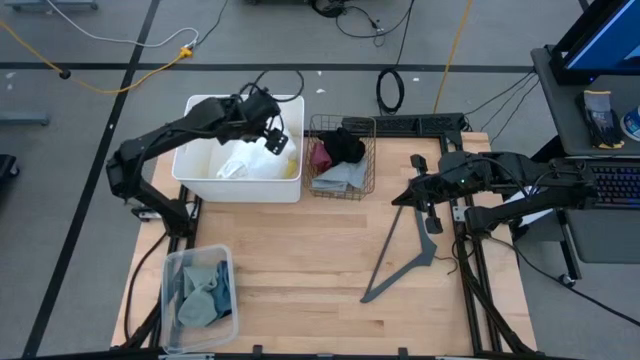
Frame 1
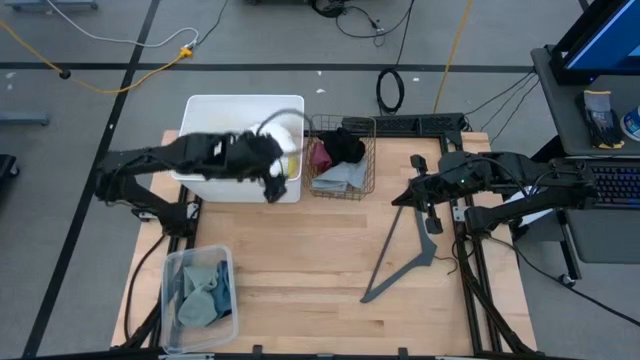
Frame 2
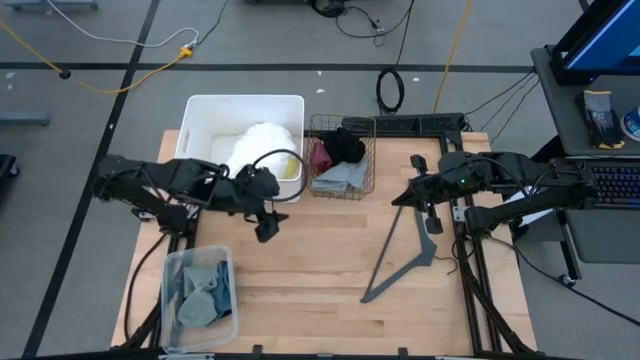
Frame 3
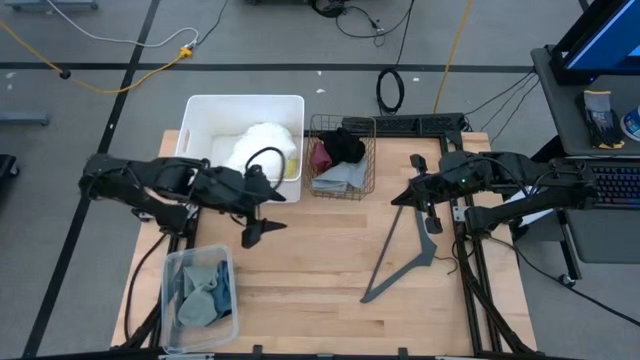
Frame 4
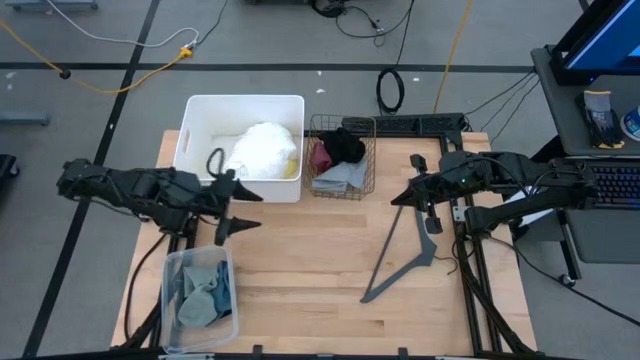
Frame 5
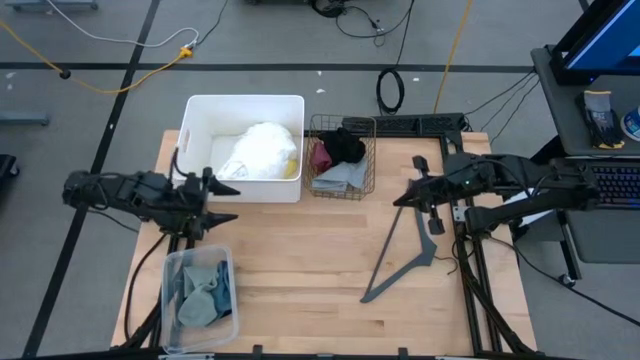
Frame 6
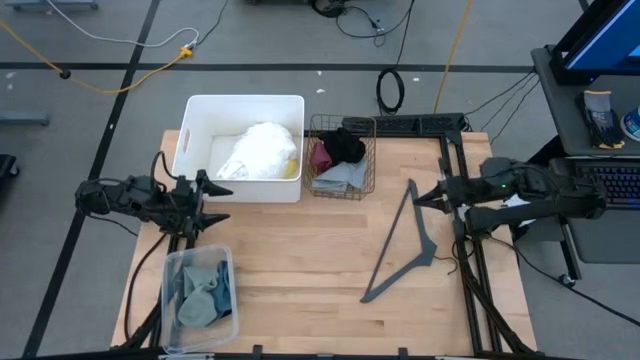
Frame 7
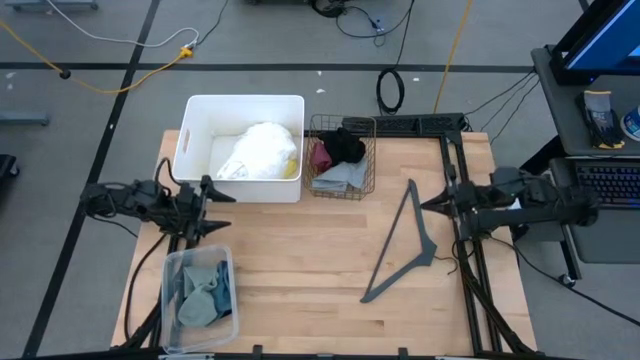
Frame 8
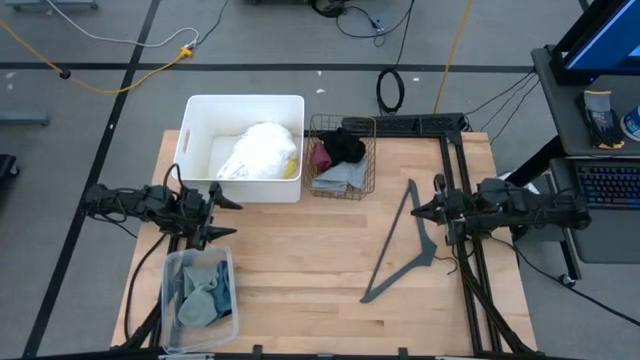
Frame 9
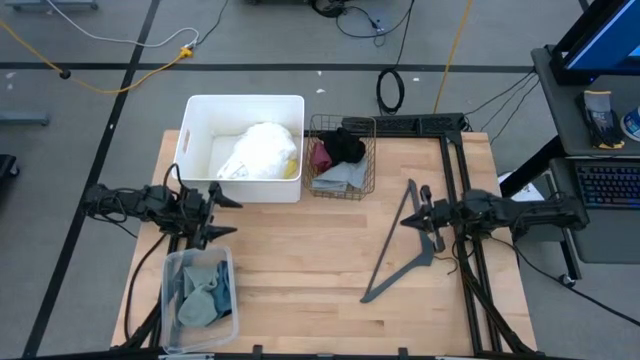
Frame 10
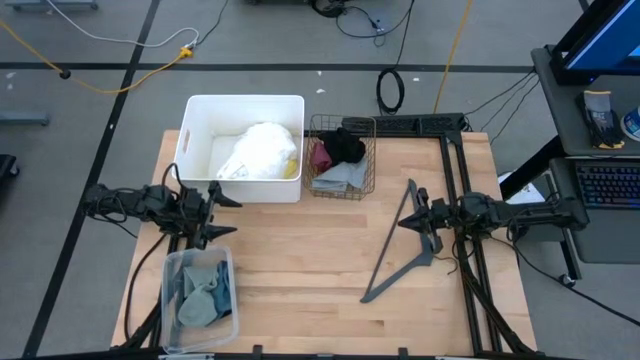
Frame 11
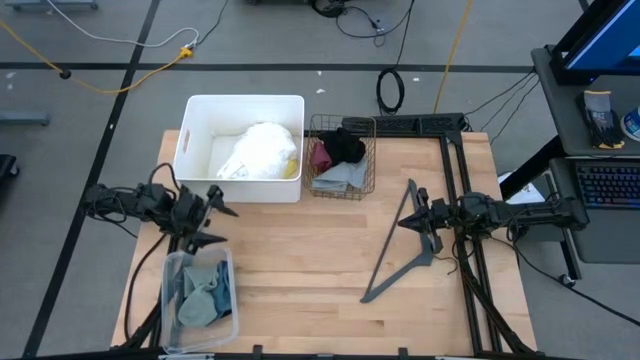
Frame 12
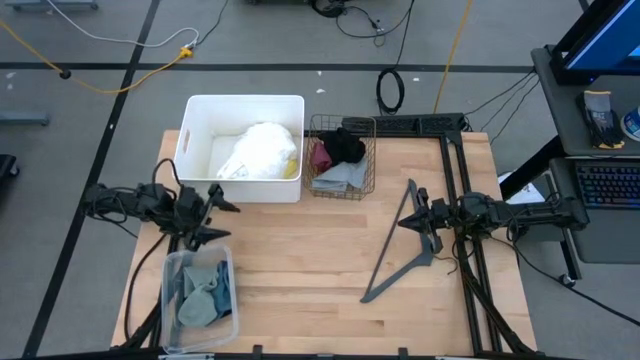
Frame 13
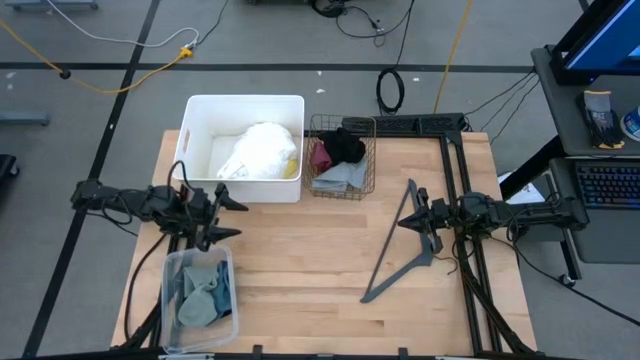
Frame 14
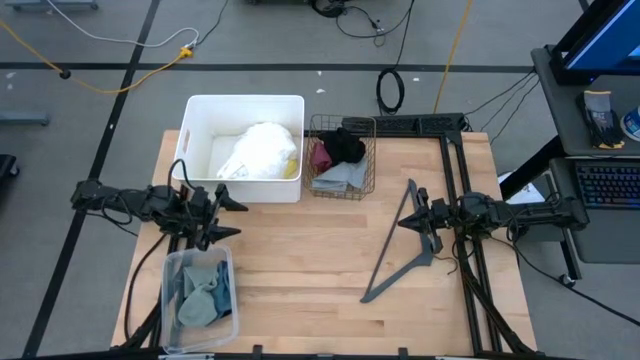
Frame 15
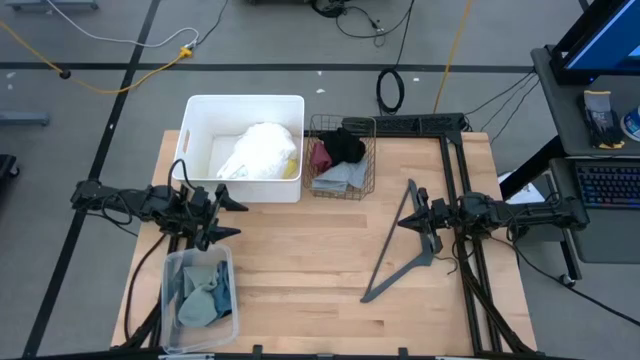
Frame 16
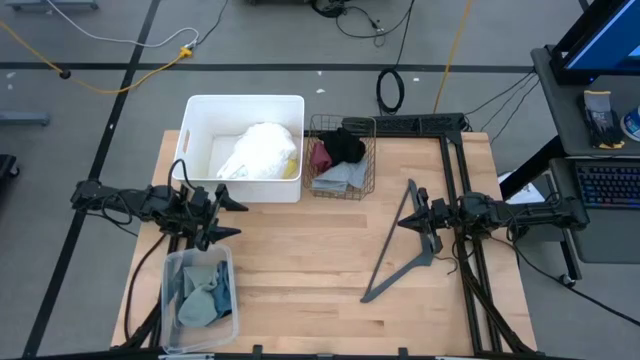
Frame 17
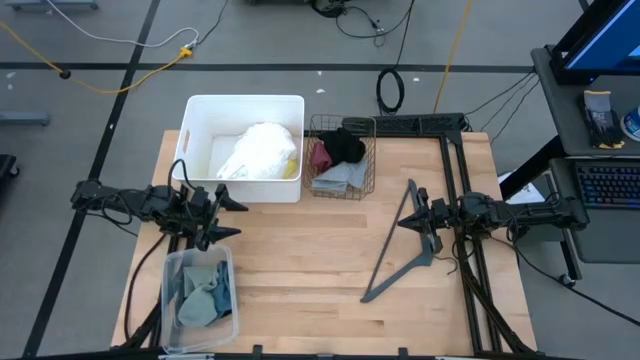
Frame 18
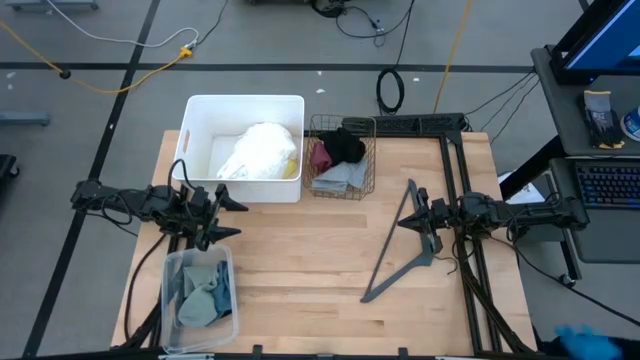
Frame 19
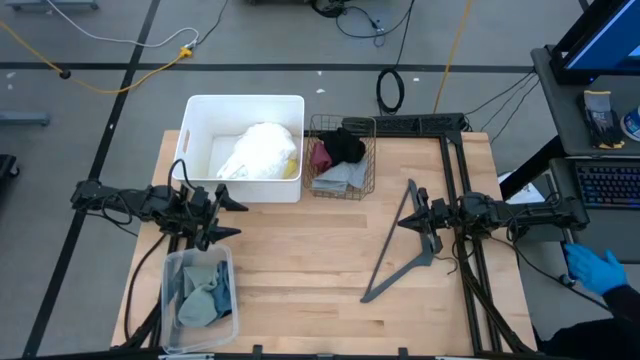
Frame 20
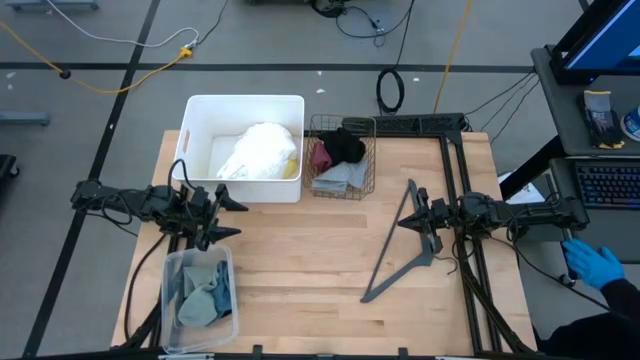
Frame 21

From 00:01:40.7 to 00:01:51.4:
Task: Pick & Place Cloths
Return to Home Position

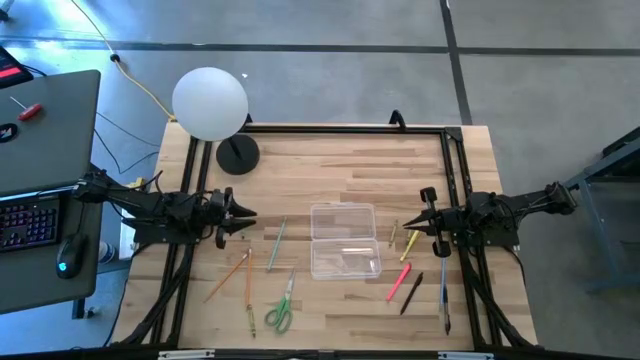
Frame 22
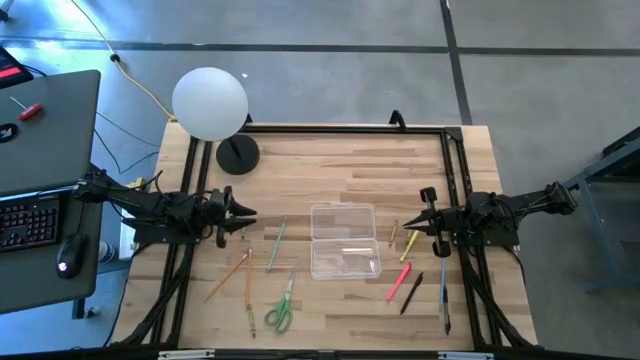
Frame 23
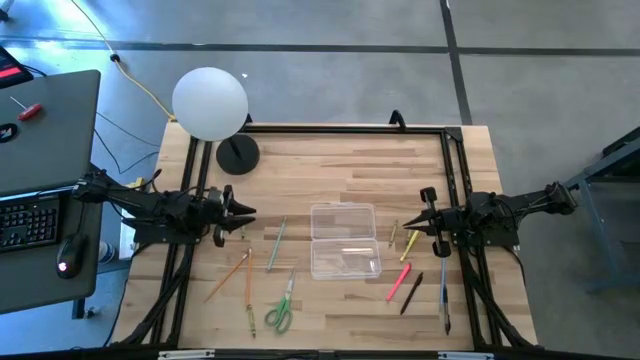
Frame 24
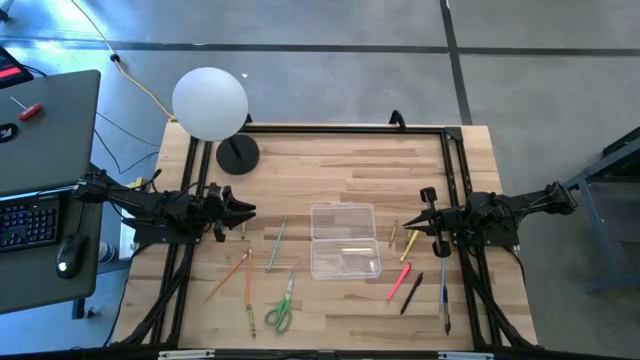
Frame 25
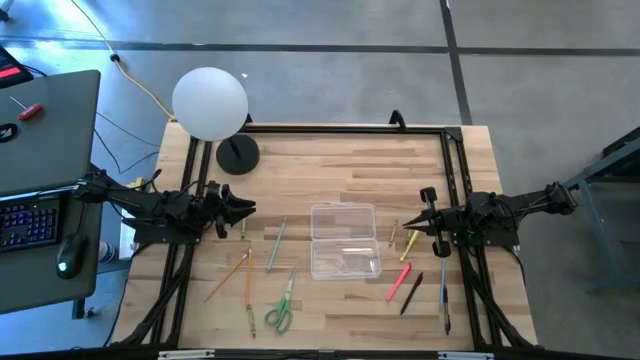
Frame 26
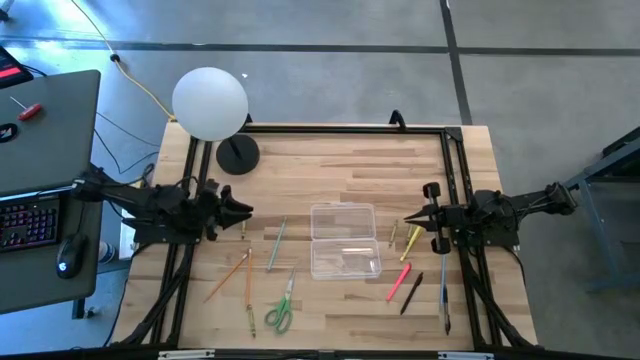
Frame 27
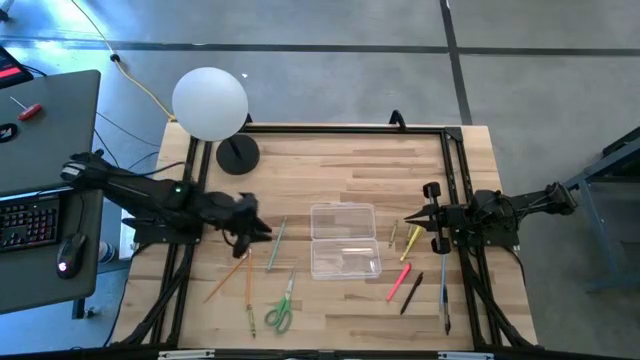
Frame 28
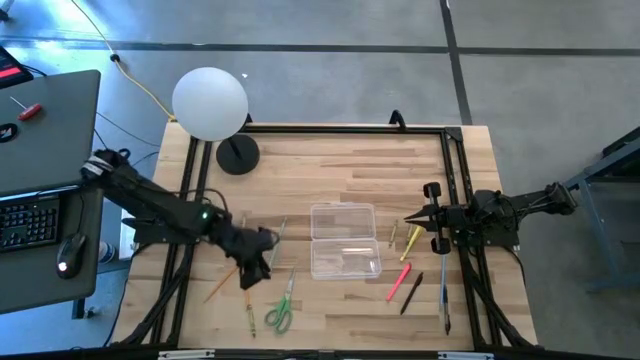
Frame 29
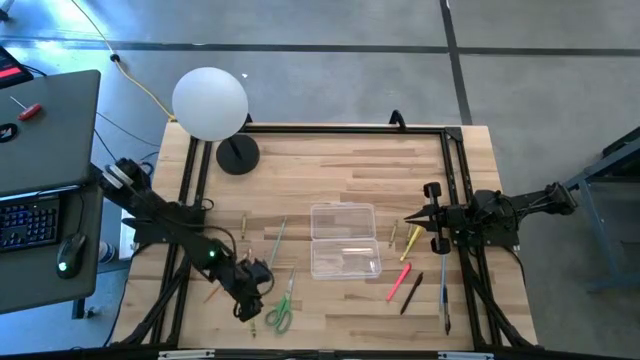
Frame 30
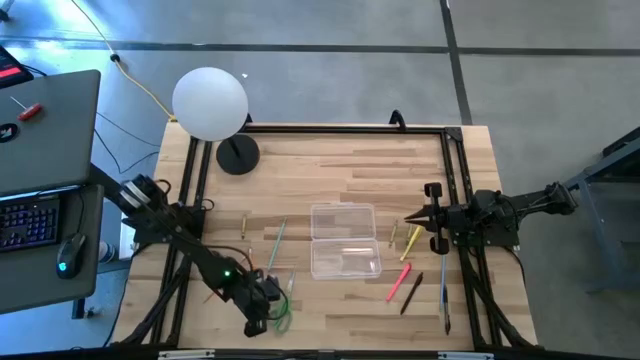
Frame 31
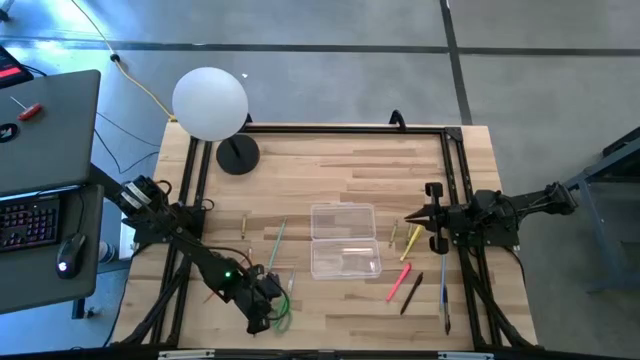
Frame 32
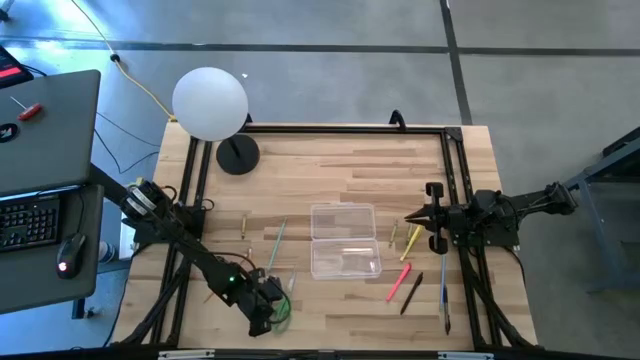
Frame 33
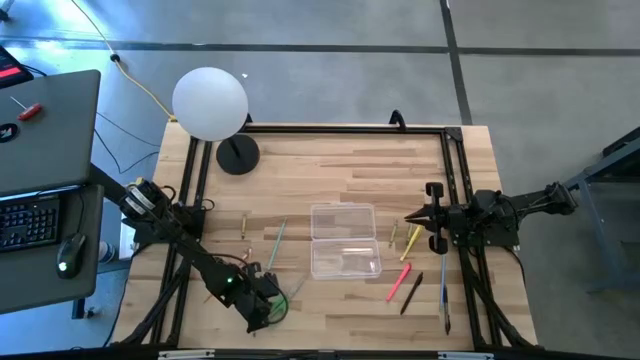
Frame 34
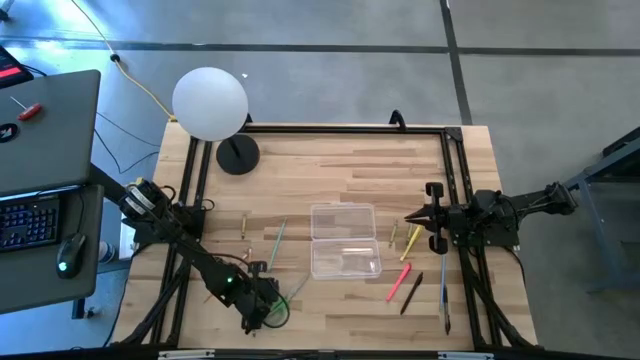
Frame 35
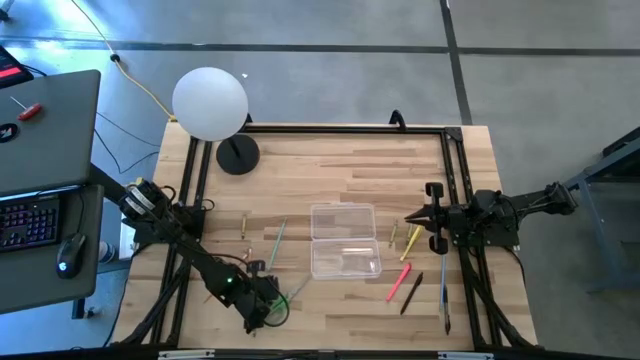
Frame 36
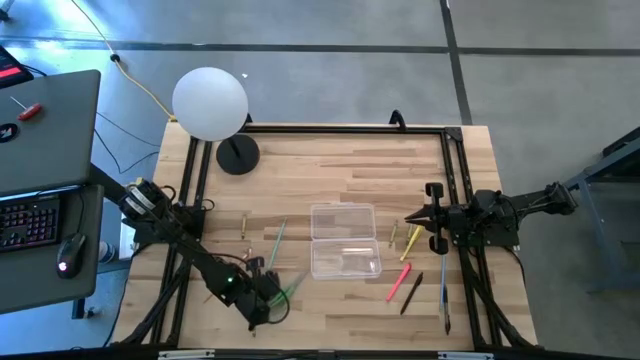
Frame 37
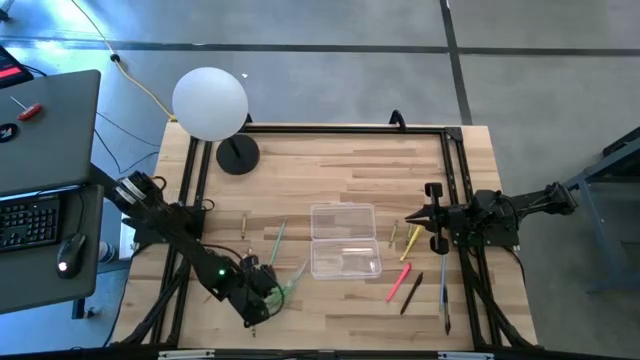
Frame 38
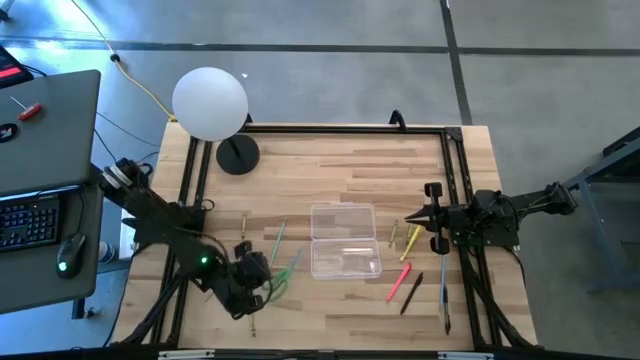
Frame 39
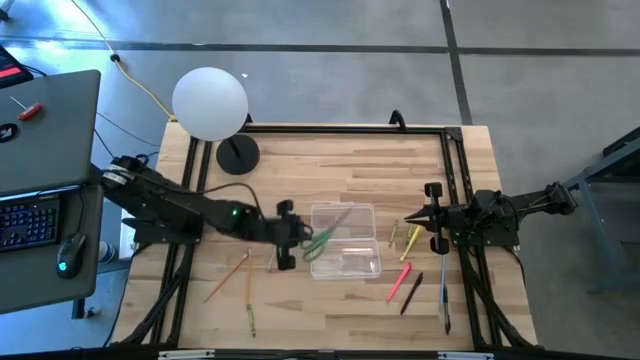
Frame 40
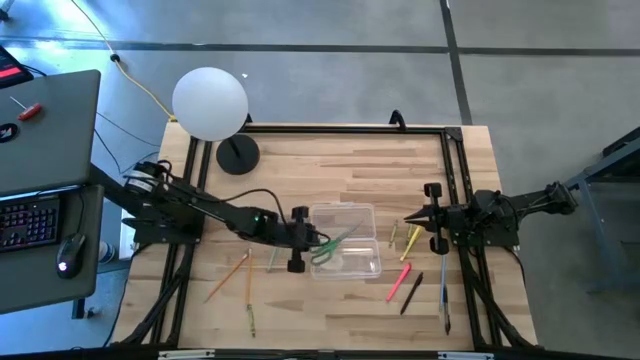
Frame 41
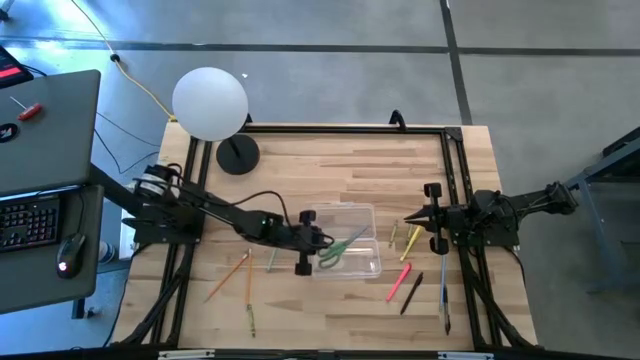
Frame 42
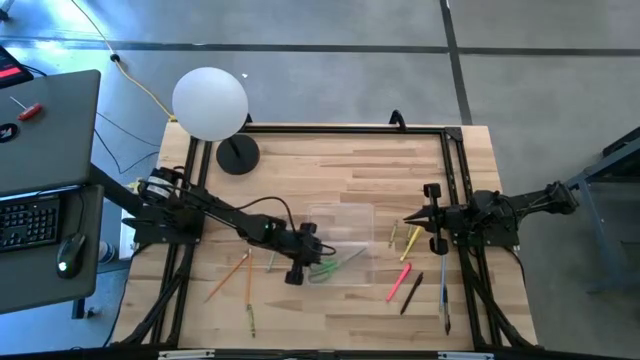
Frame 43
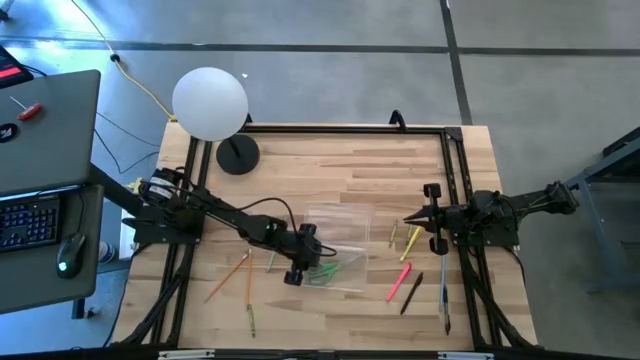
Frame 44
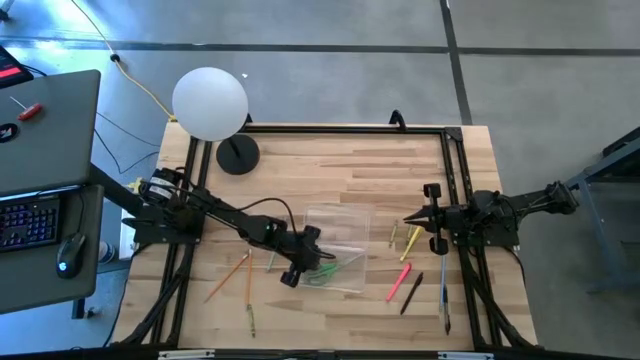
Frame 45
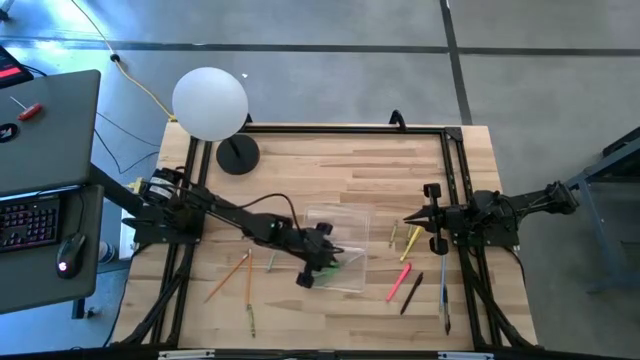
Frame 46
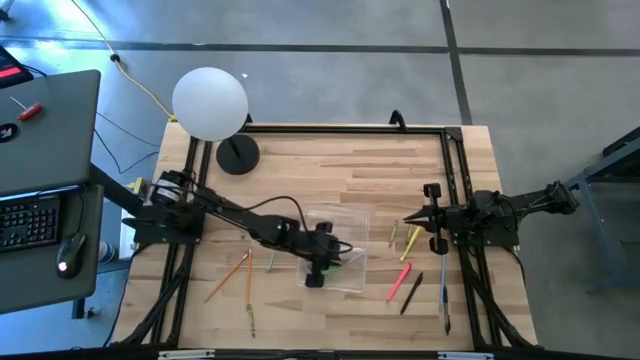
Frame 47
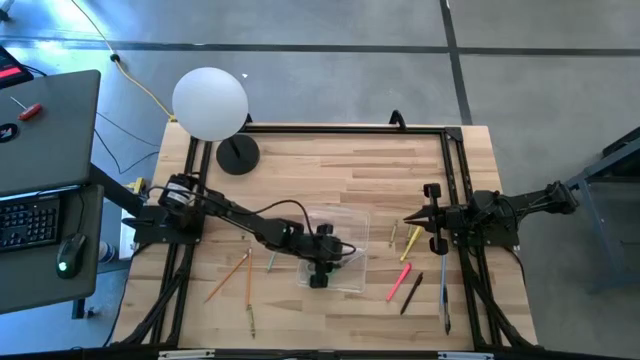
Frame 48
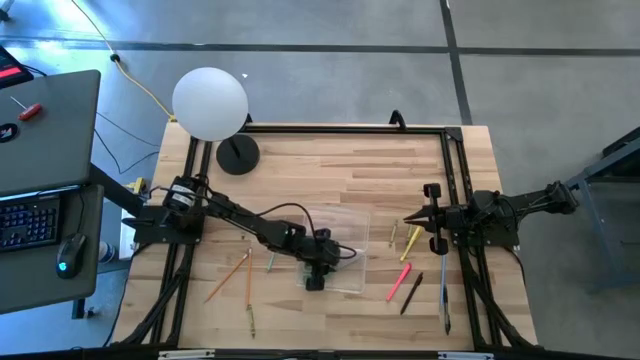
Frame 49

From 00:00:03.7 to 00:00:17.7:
Task: Pick & place school supplies into a supply box
Put the green scissors into the transparent supply box
